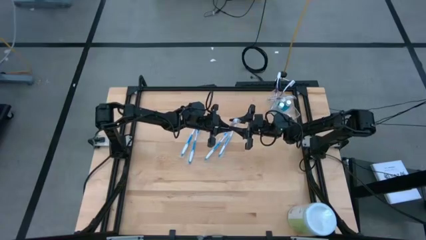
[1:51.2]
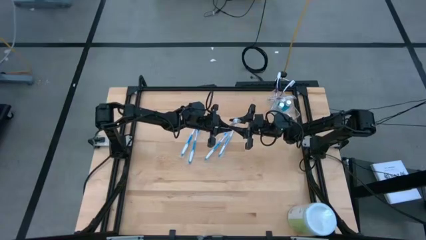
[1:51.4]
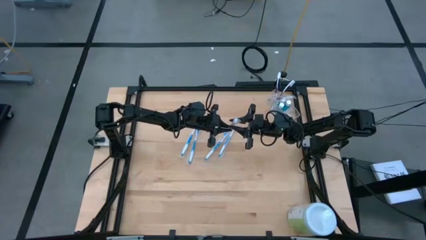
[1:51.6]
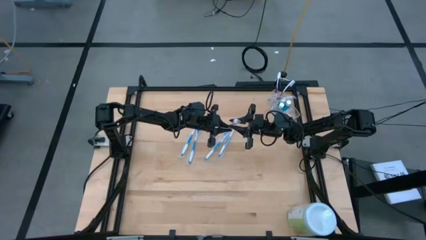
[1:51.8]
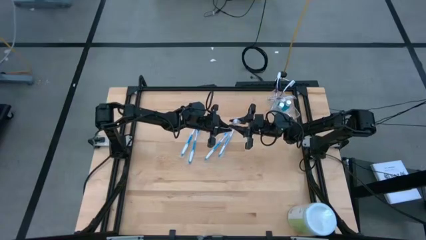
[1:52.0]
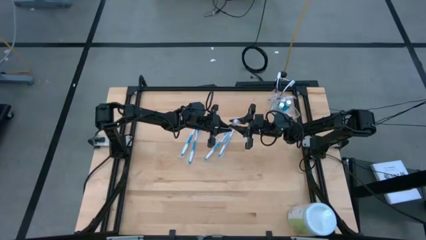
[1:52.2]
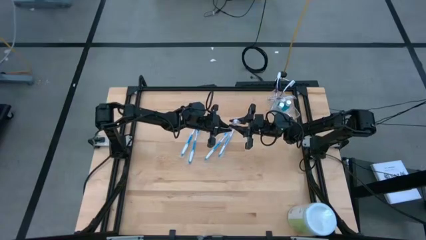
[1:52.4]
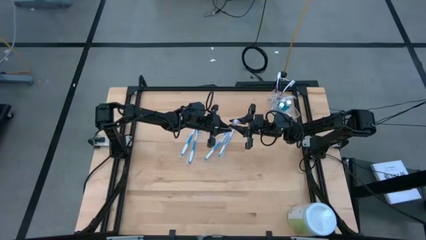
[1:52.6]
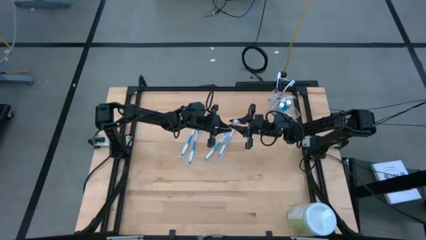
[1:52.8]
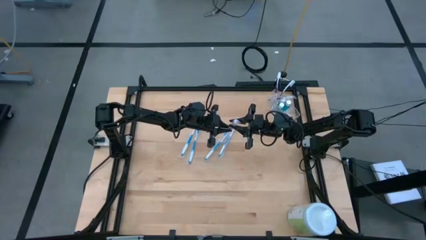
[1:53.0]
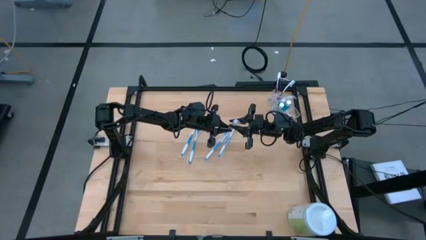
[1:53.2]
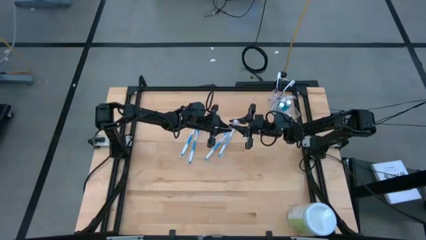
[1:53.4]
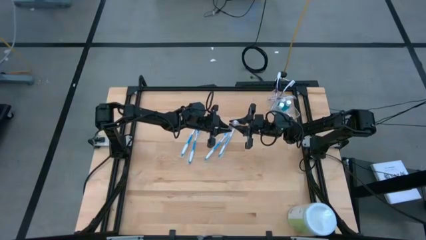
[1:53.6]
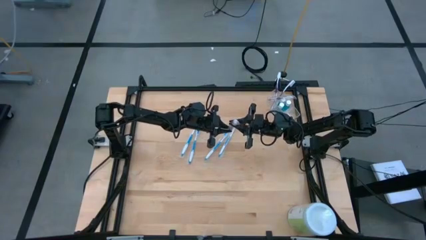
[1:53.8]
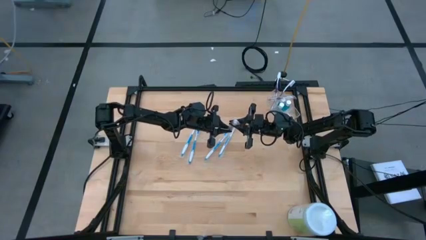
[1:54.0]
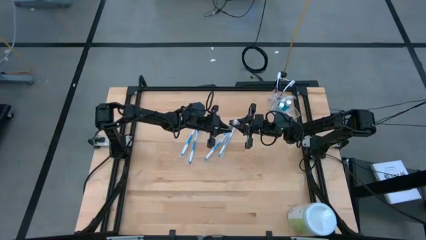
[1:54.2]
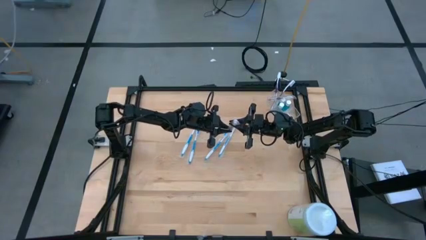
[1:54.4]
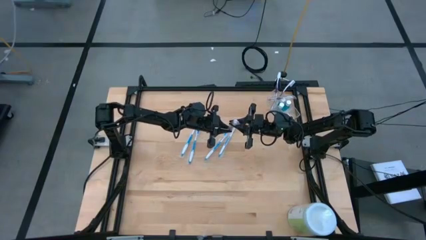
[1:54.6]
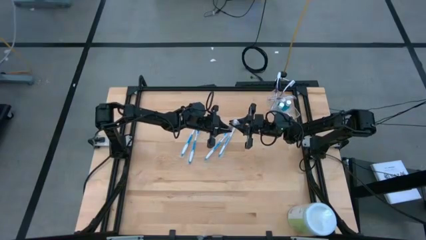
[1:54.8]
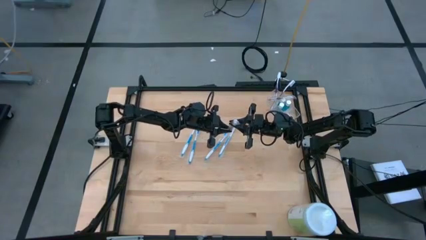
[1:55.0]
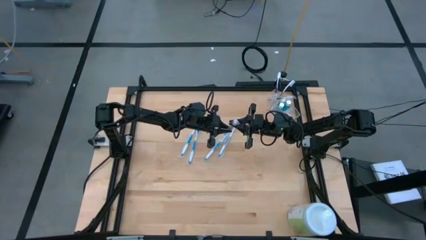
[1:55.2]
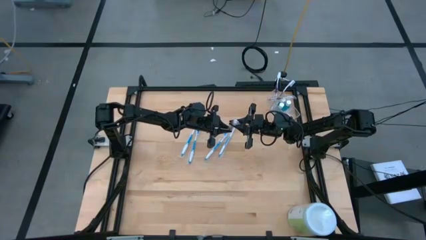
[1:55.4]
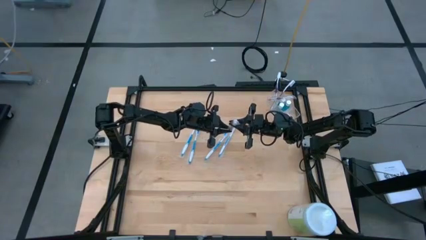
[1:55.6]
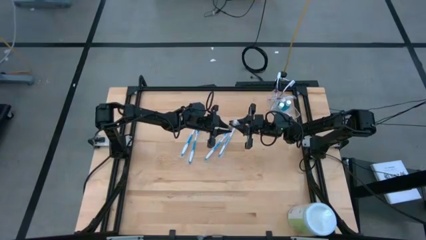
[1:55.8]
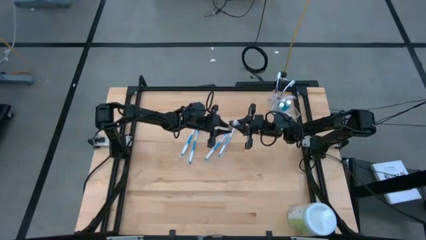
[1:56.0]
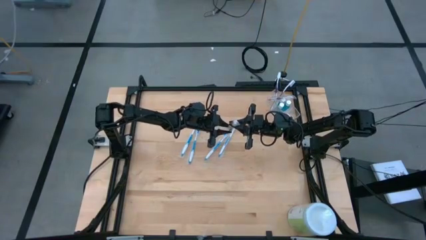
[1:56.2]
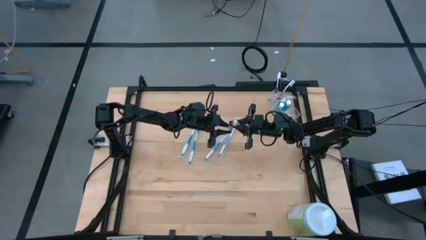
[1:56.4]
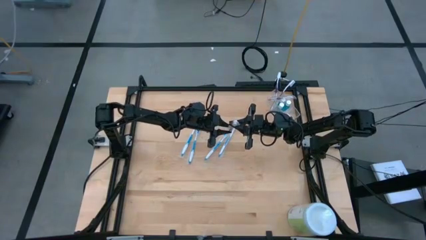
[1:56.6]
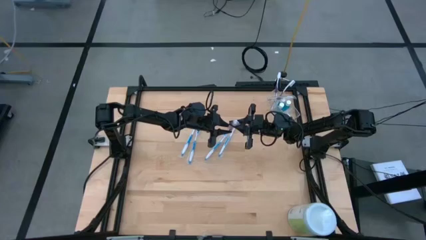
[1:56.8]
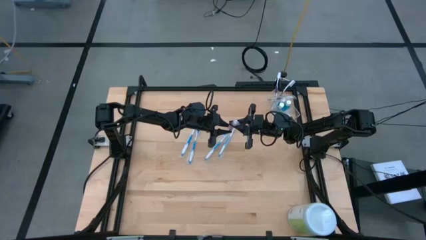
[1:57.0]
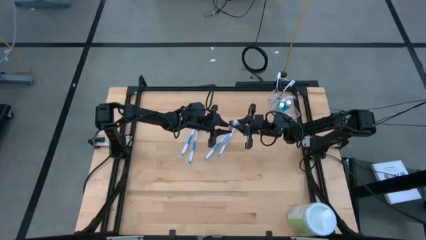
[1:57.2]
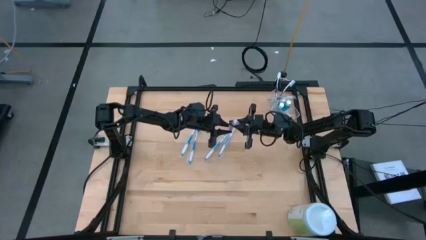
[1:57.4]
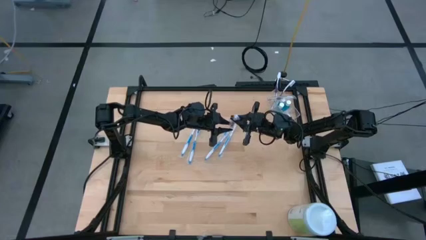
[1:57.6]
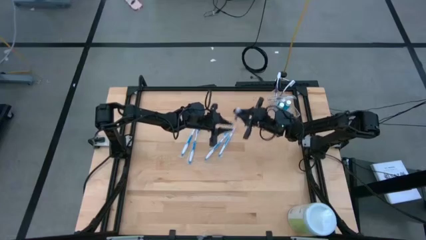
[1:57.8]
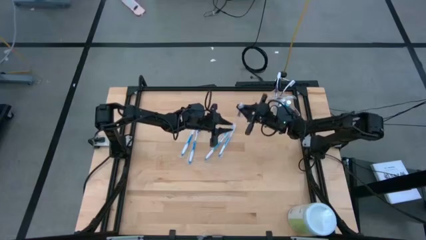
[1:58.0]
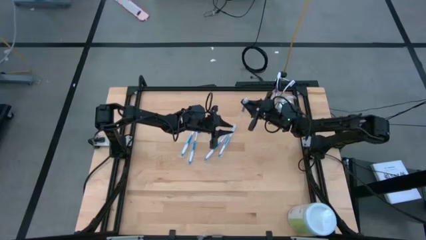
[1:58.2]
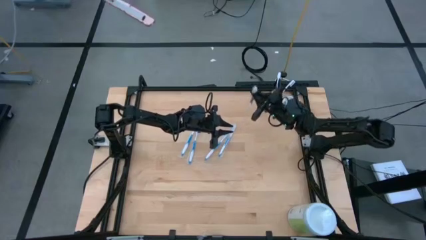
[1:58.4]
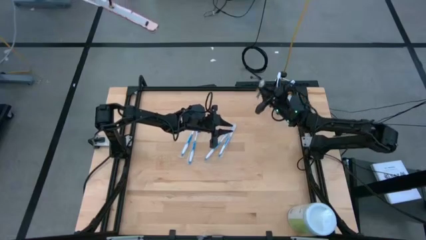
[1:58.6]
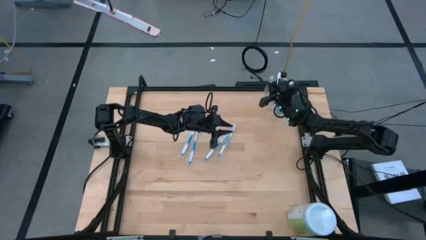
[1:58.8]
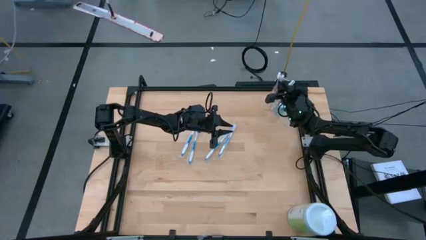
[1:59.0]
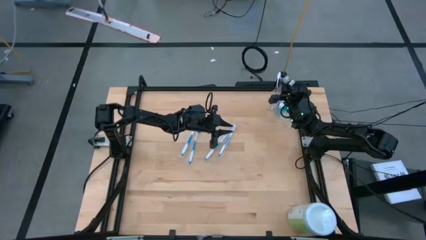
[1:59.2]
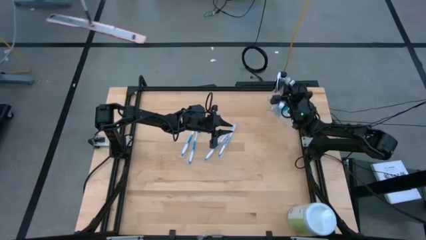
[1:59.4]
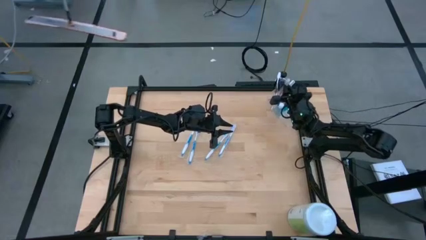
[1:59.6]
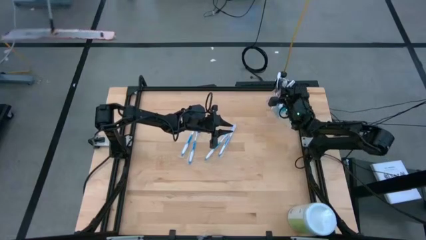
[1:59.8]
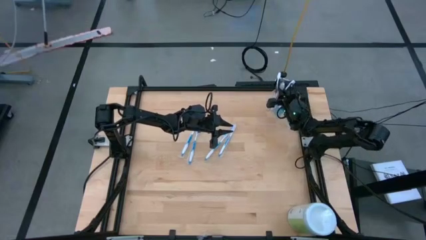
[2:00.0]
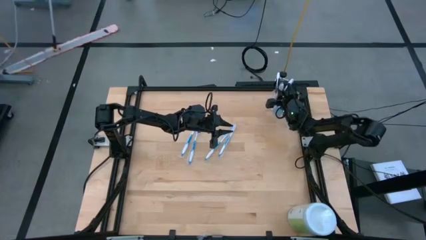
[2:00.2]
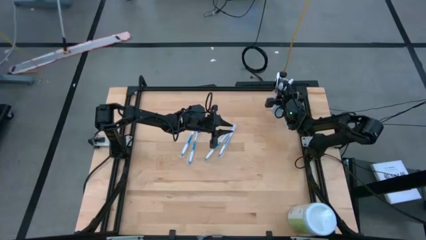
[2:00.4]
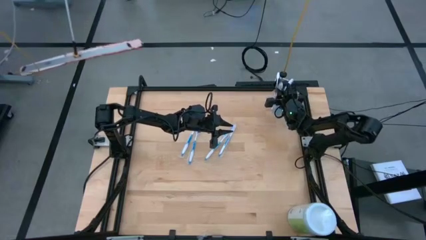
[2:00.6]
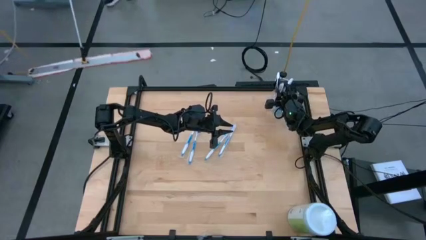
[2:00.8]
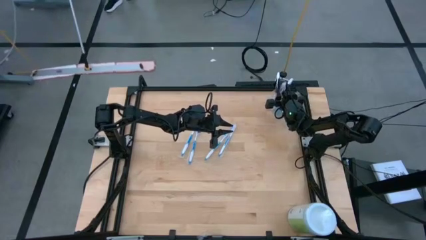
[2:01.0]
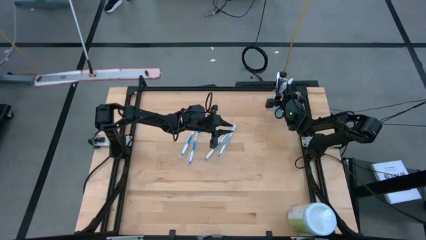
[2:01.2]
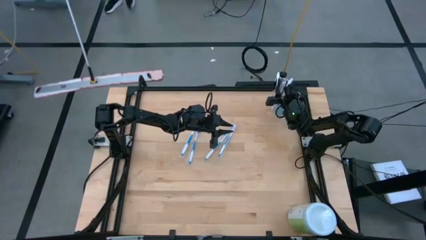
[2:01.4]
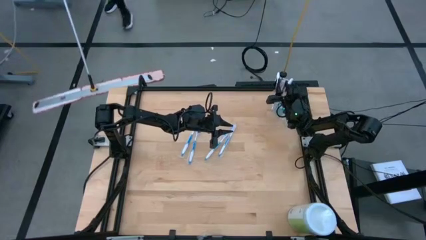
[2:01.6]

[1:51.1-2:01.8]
Task: Pick & Place toothbrushing station
Put the violet toothbrush into the left of the transparent organizer
